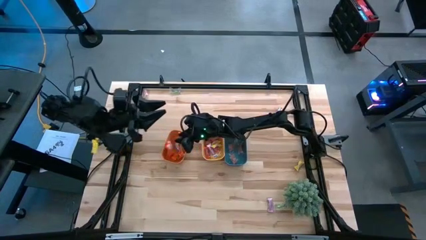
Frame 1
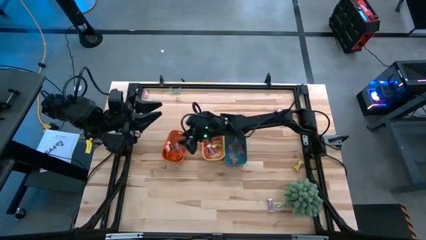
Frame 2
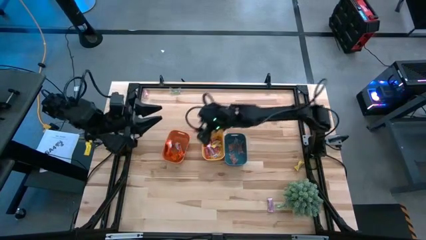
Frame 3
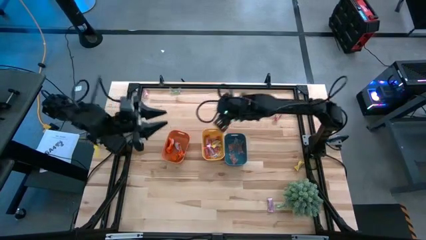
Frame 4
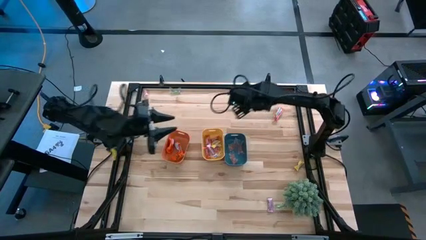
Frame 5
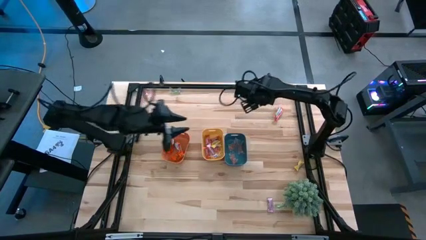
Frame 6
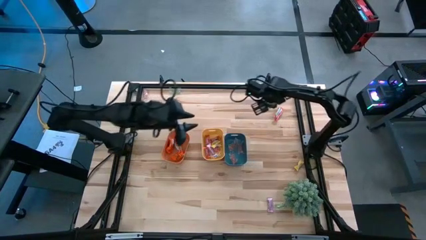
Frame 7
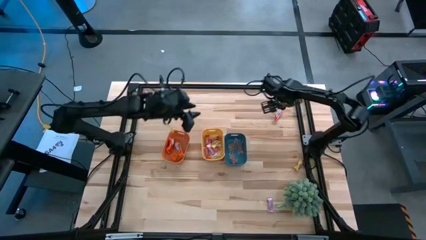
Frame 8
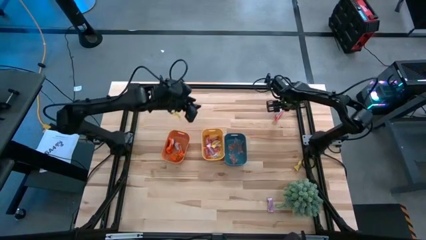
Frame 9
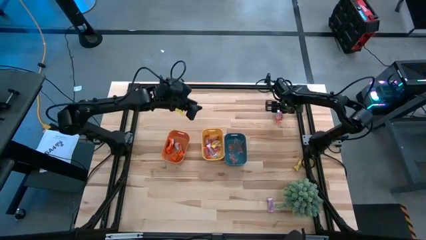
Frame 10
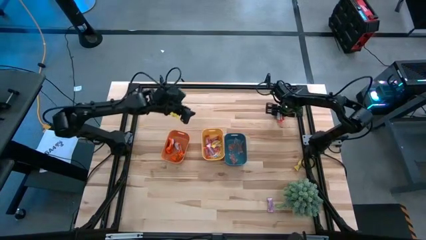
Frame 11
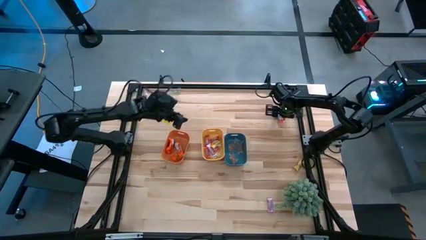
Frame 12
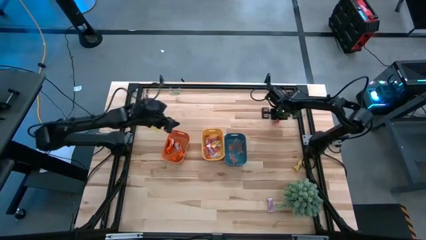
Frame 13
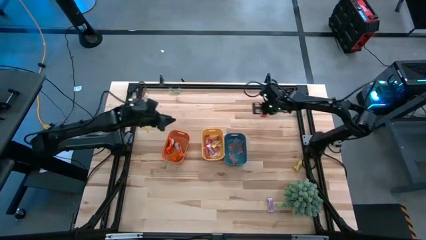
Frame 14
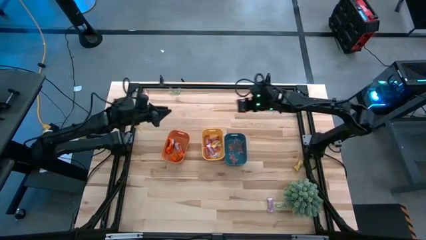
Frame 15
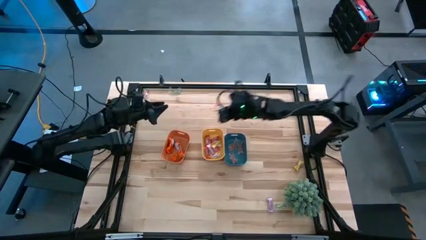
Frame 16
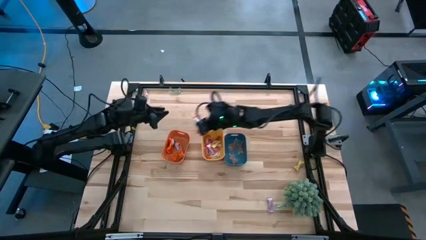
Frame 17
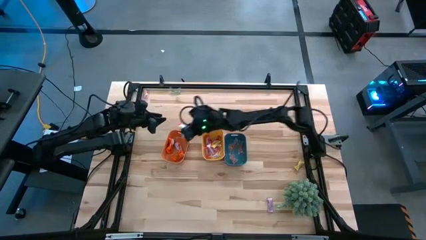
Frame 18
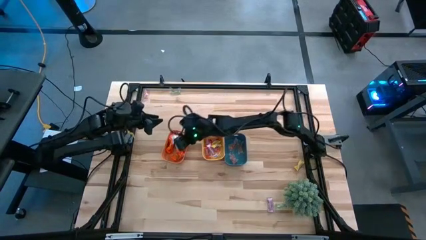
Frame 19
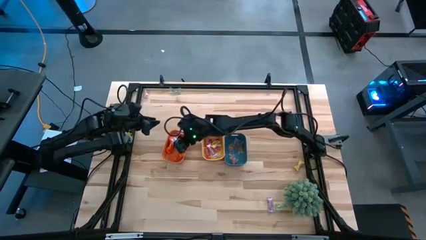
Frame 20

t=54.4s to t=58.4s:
Task: Sort candy
Put the orange chocolate into the orange bin

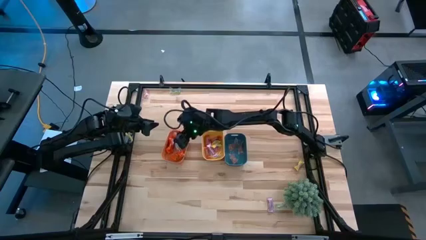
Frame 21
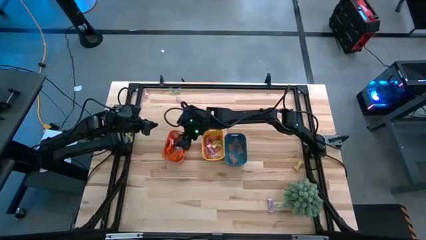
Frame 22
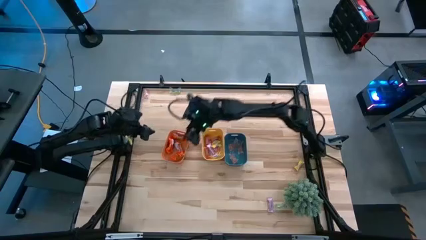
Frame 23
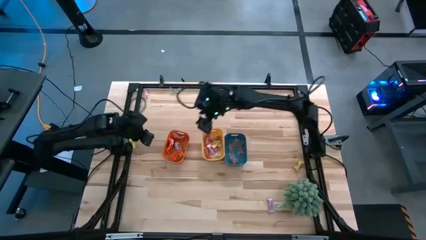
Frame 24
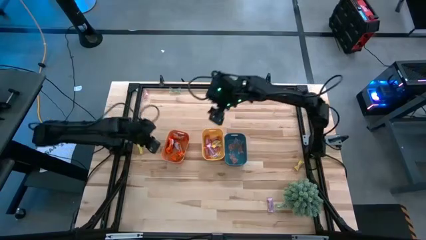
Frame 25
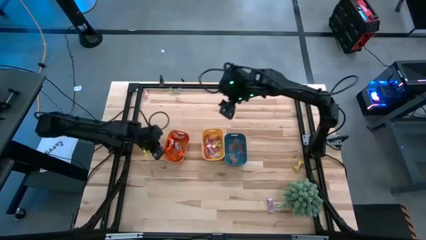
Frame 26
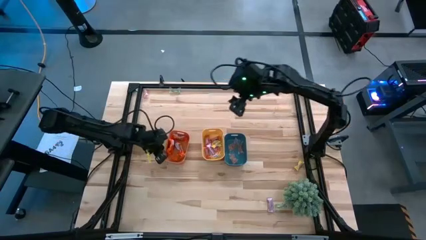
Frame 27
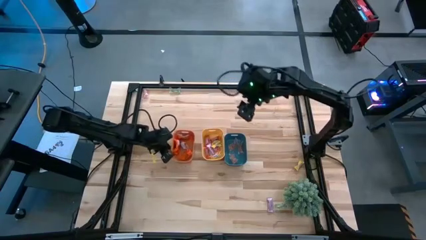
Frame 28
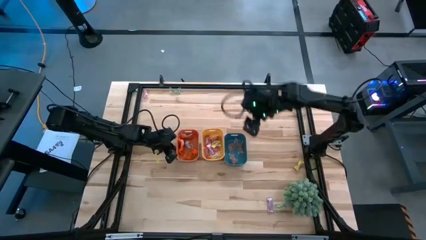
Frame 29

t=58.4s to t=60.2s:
Adjust the orange bin on the table

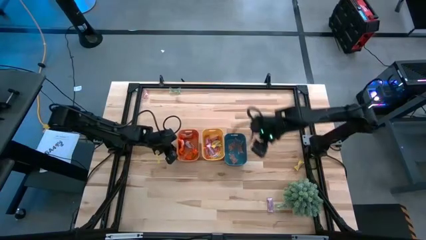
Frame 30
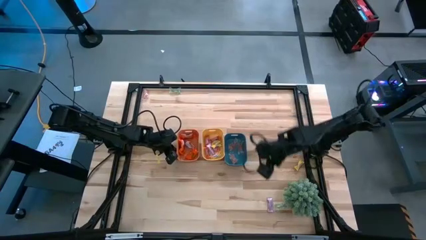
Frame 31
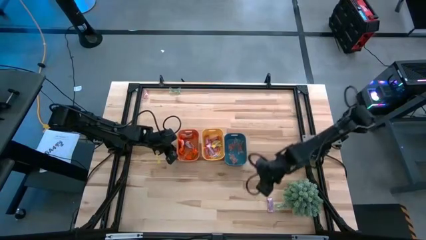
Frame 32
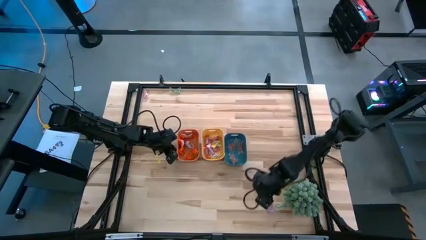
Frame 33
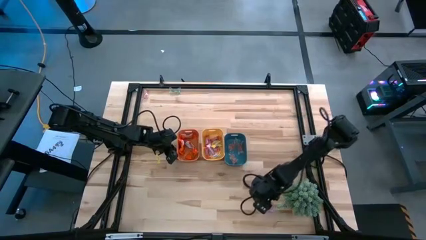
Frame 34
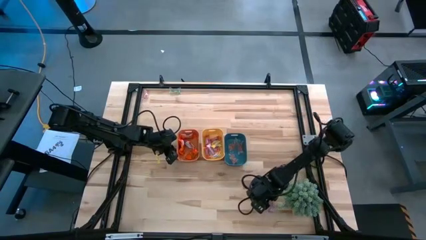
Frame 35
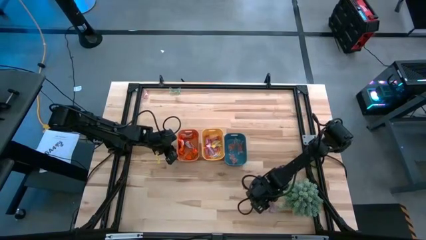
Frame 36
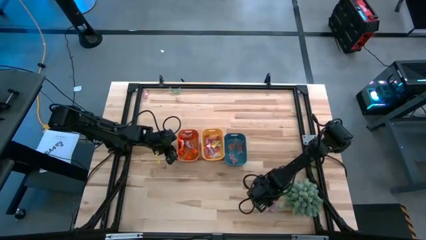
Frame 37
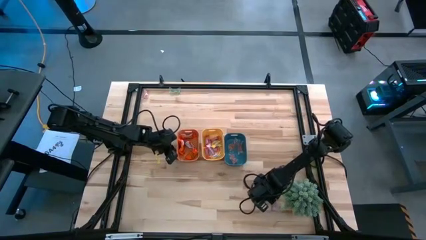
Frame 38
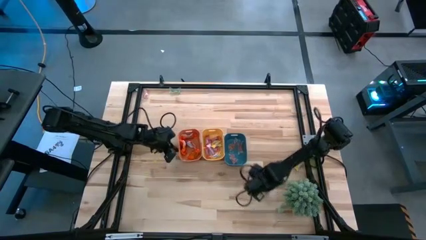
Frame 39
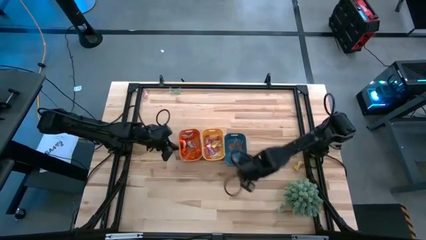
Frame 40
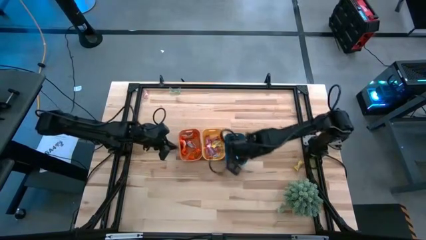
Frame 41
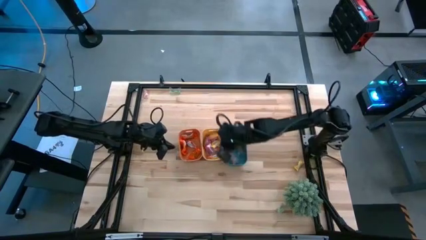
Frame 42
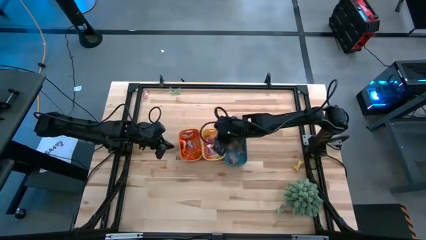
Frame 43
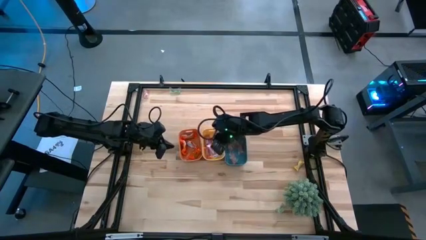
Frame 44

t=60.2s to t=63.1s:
Put the purple candy into the yellow bin

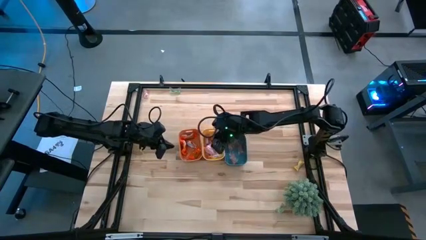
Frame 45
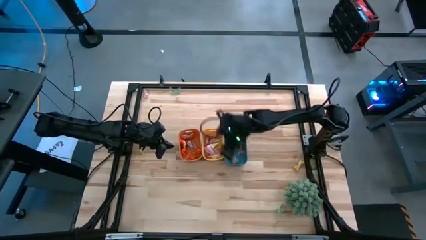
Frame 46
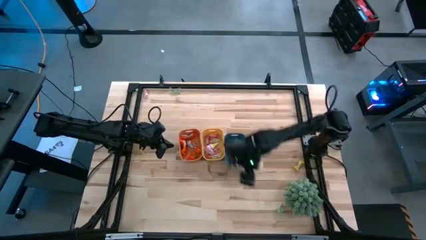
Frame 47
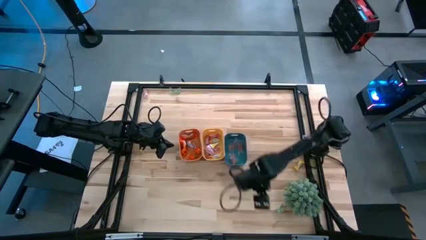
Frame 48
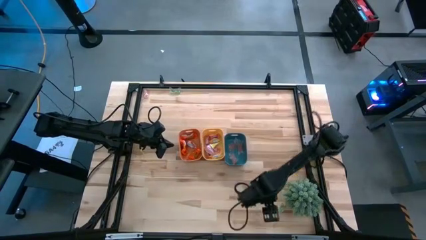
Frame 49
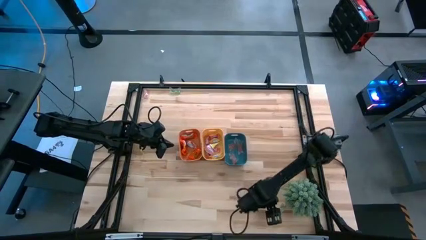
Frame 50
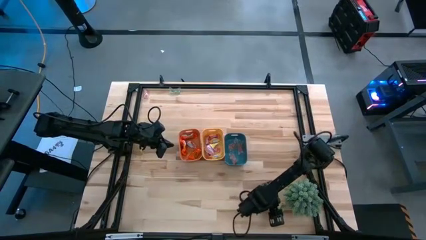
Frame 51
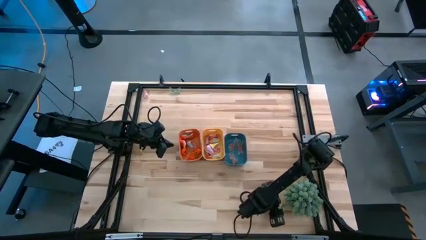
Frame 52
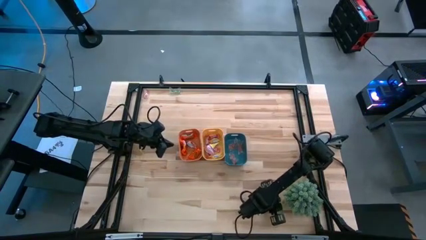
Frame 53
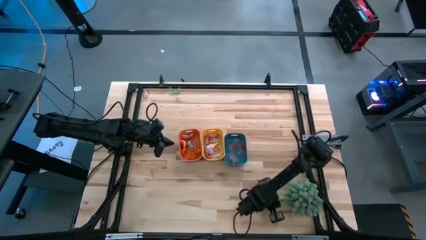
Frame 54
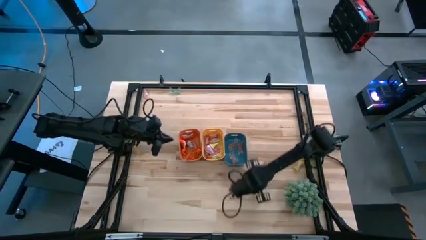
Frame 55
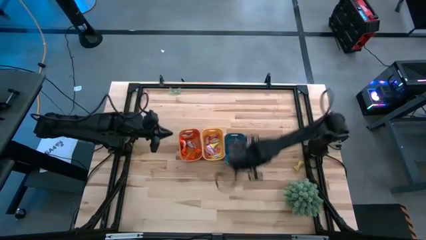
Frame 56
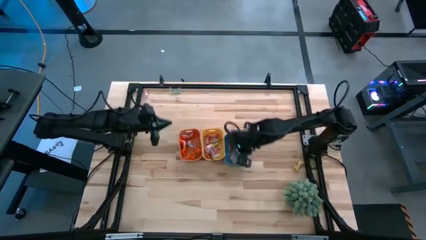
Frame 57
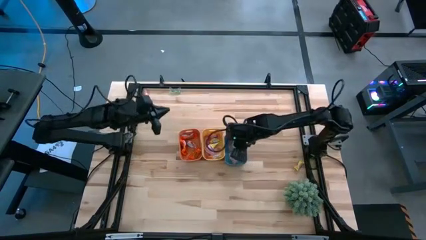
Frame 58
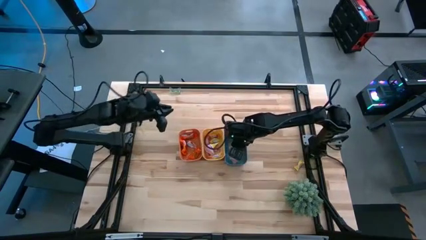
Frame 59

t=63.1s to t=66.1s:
Put the green gummy into the blue bin

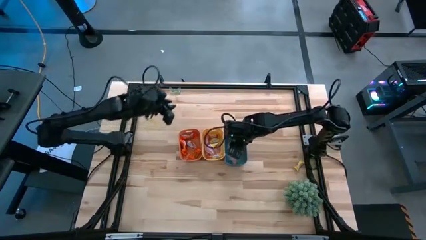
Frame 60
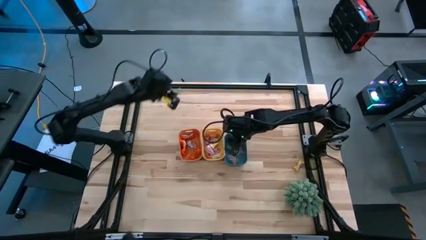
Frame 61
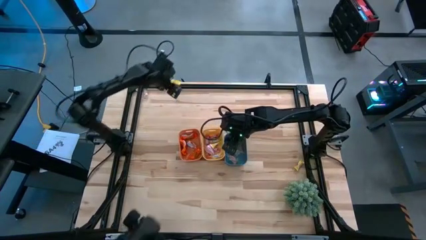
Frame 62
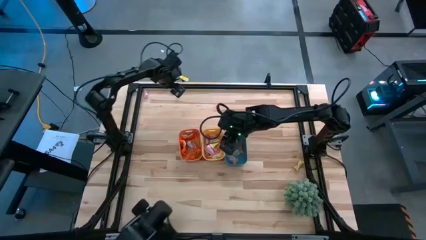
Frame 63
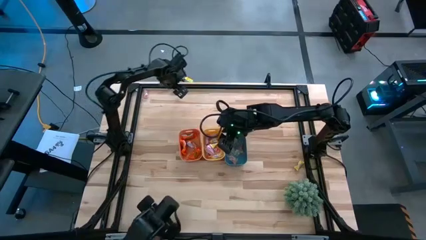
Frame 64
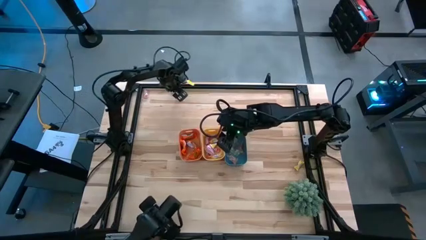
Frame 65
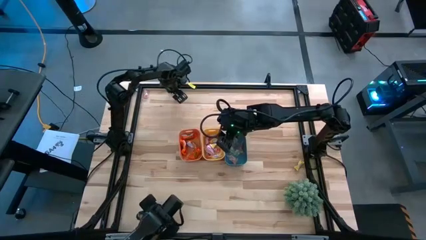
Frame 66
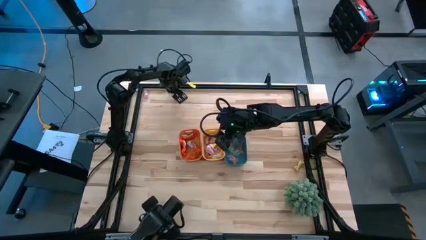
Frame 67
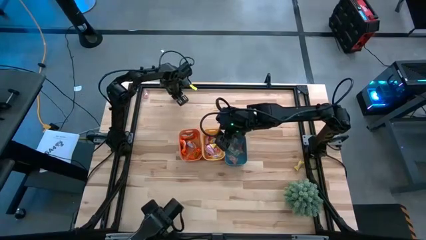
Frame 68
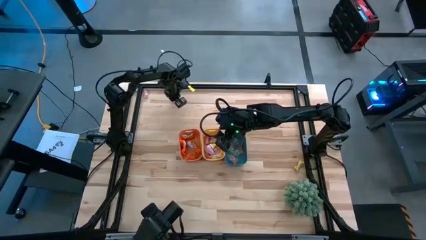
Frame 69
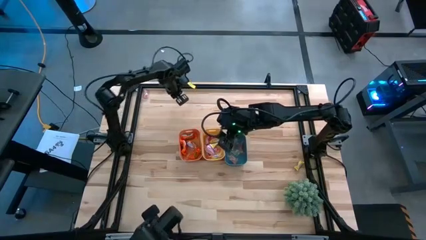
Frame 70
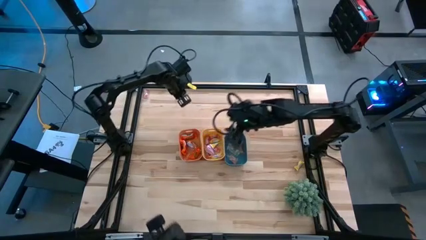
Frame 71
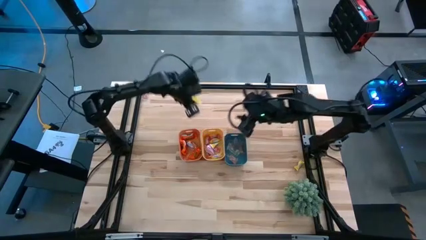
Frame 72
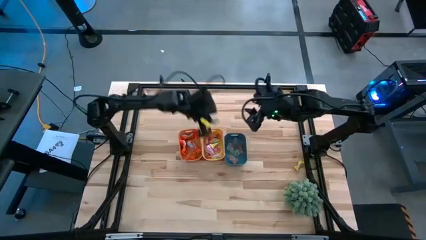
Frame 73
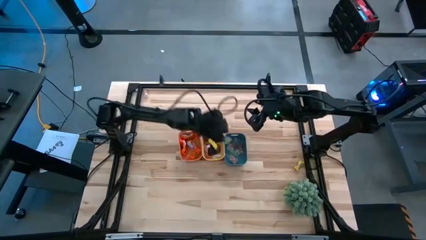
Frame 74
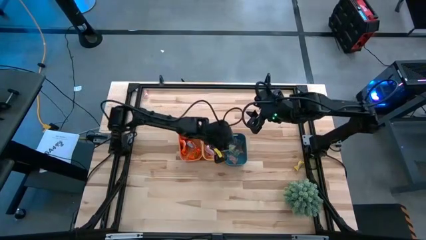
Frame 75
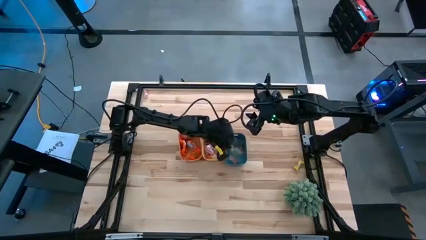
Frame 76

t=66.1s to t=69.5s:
Put the green gummy into the blue bin
